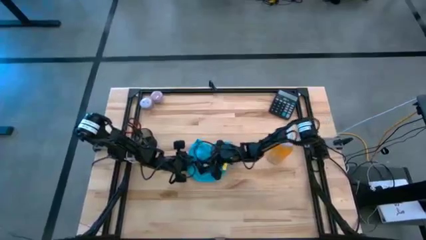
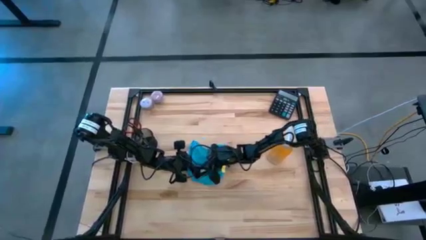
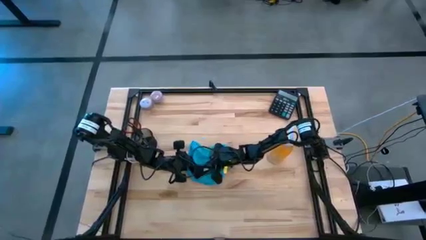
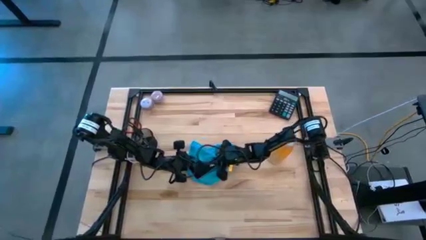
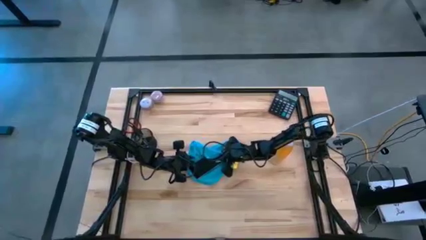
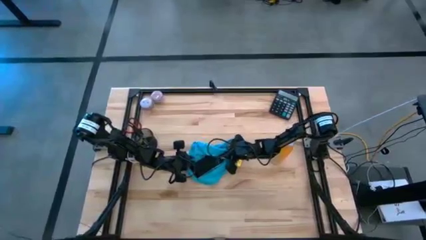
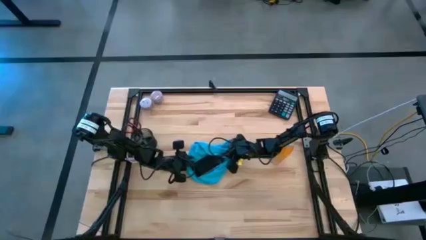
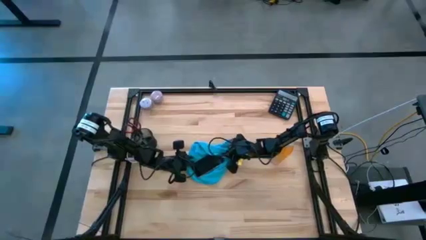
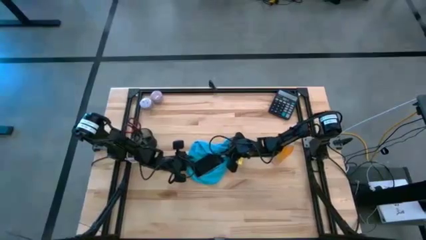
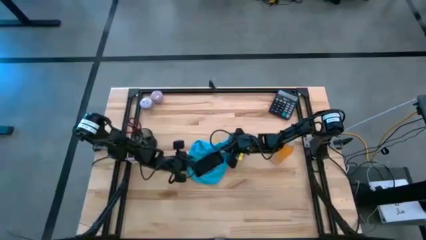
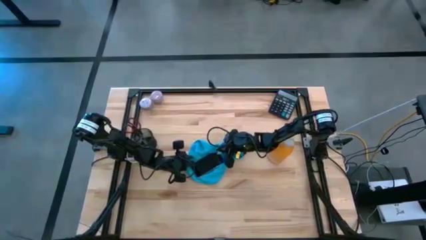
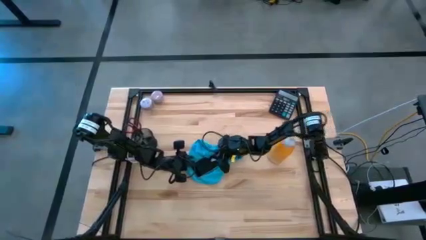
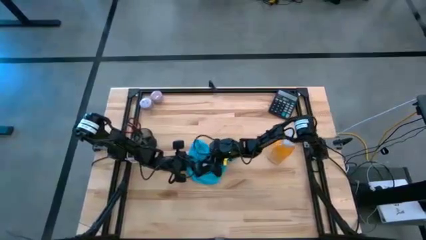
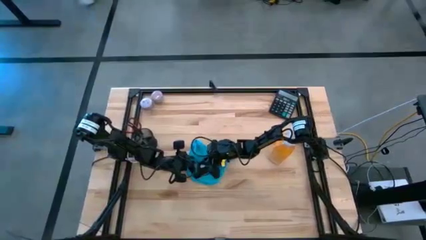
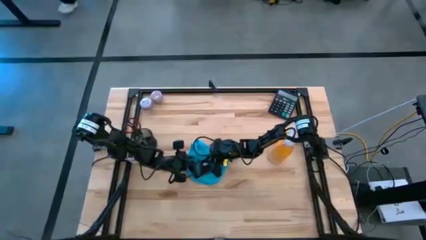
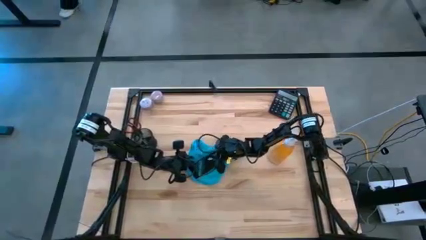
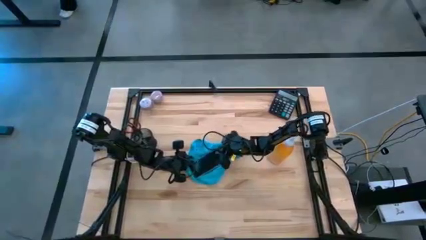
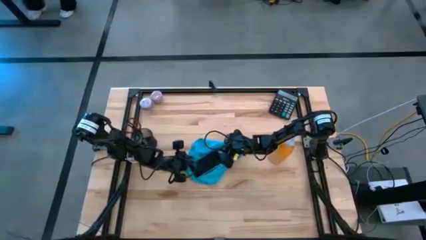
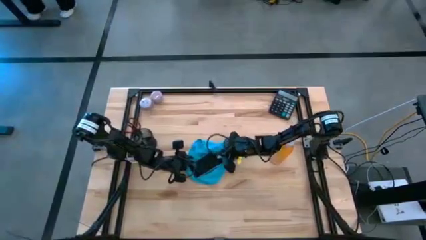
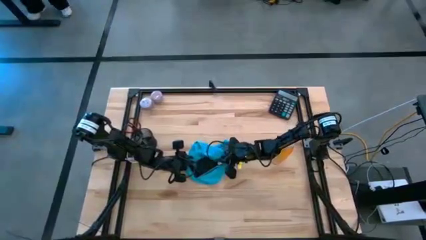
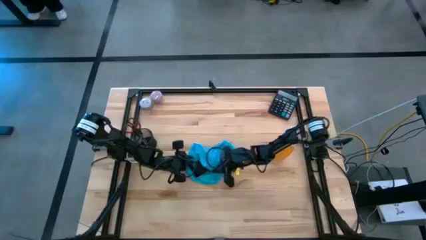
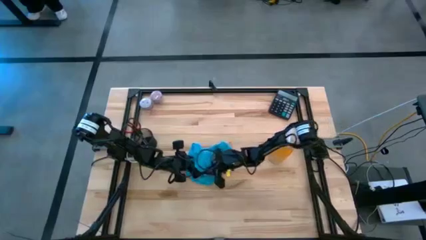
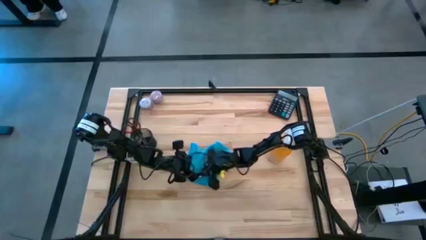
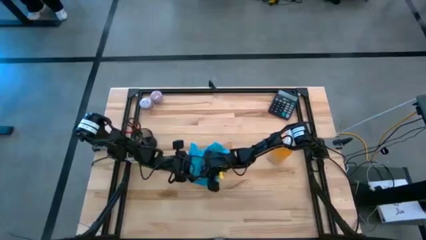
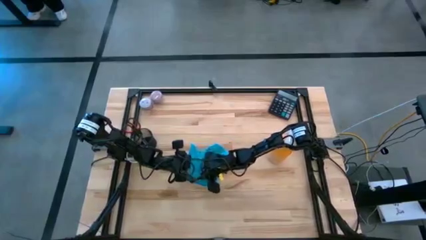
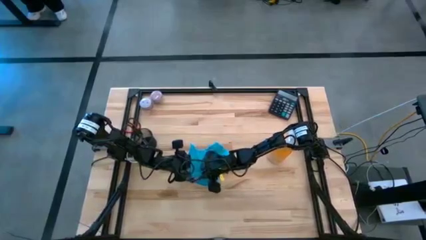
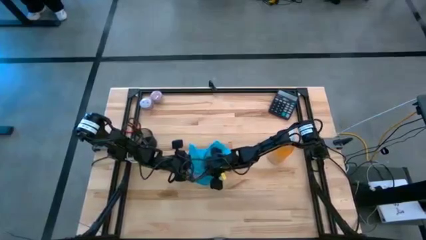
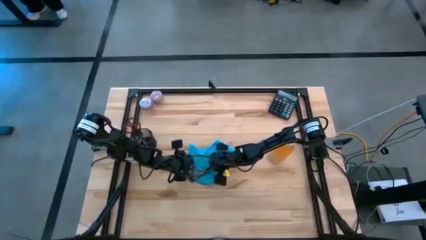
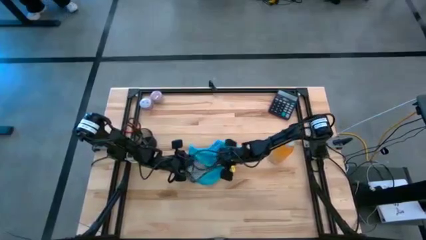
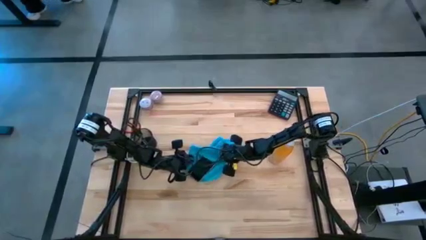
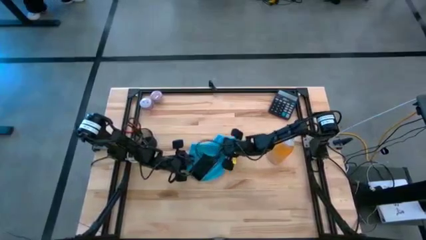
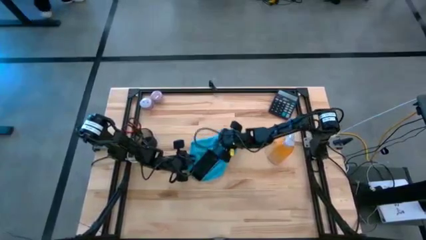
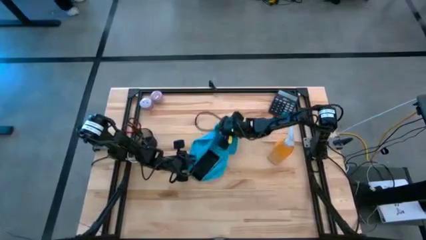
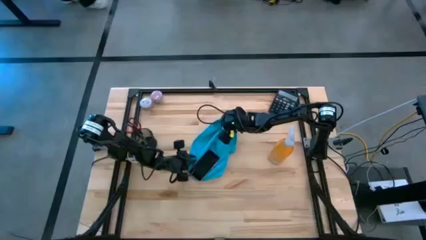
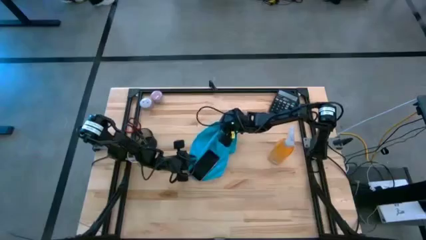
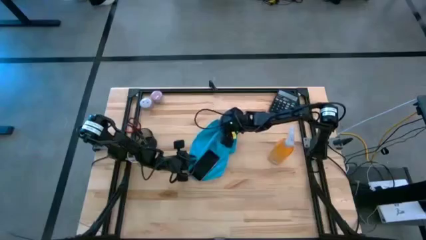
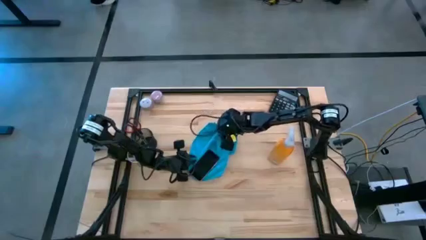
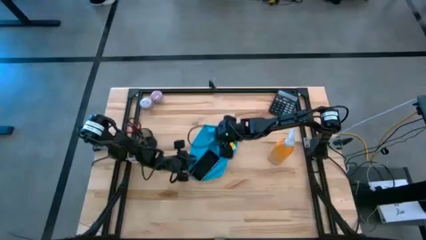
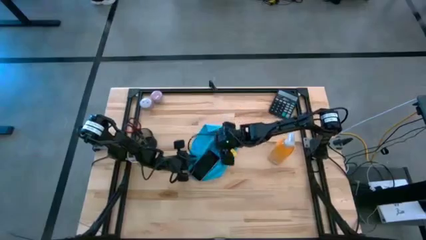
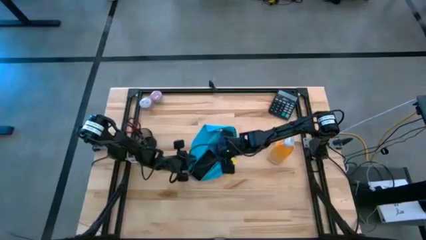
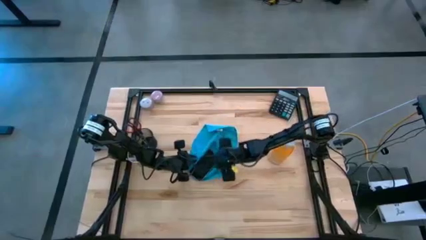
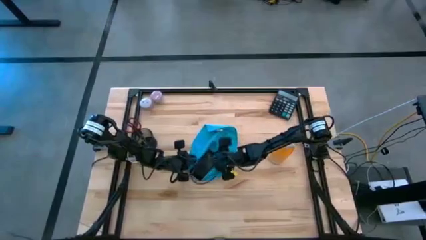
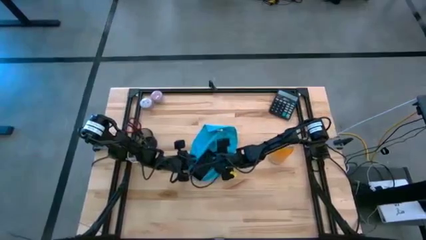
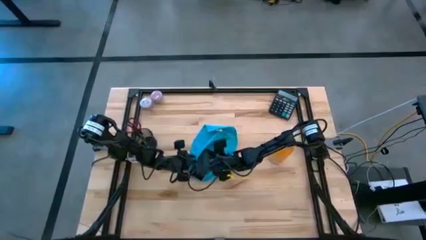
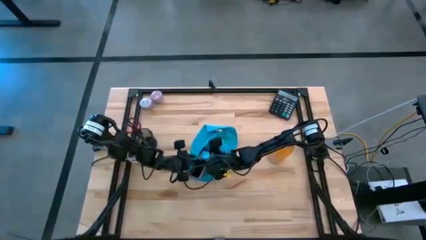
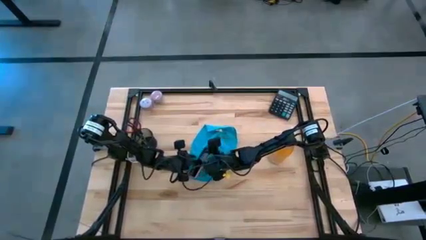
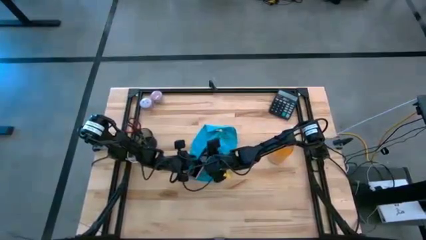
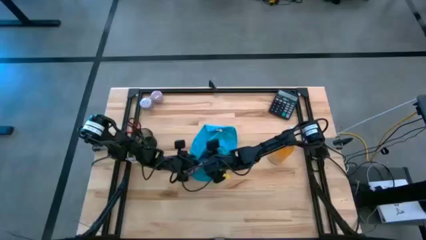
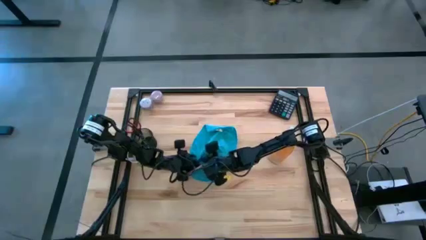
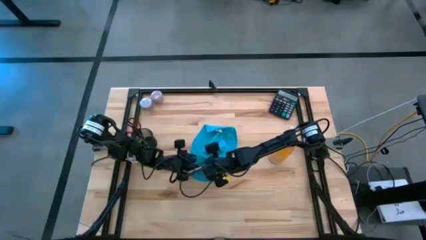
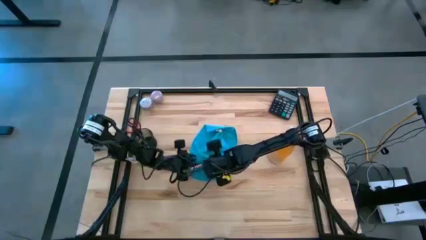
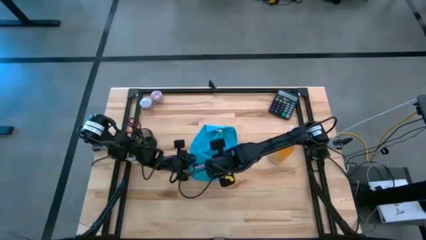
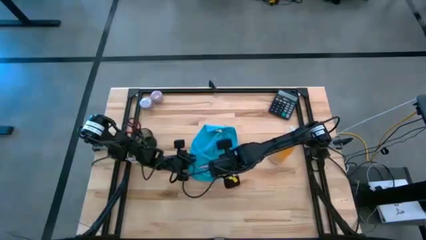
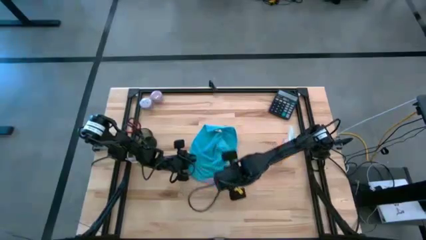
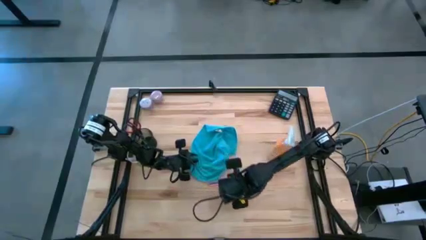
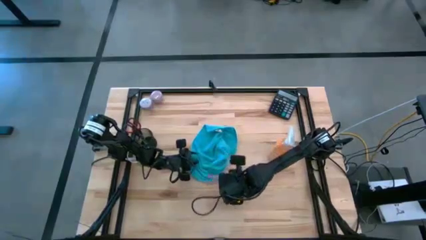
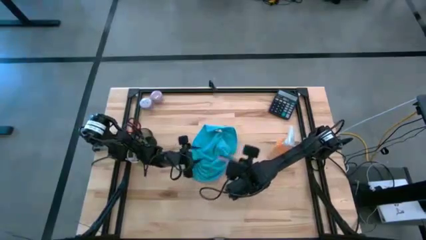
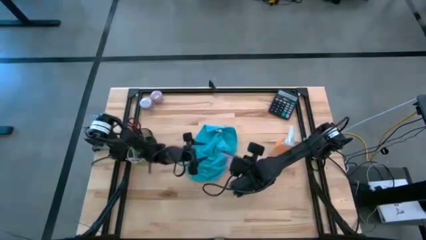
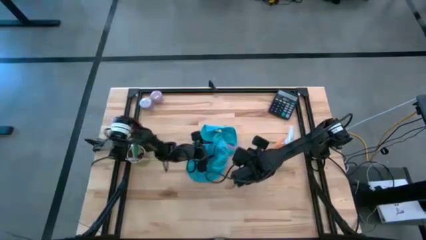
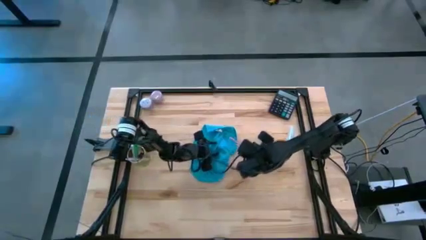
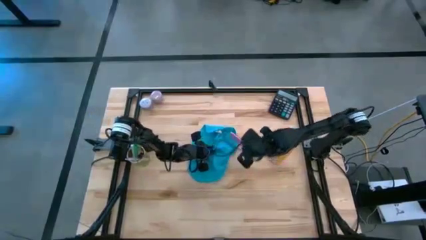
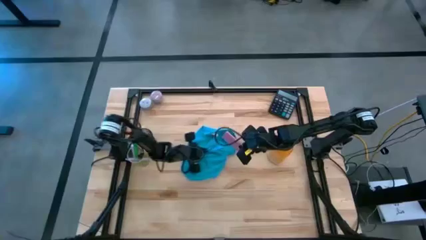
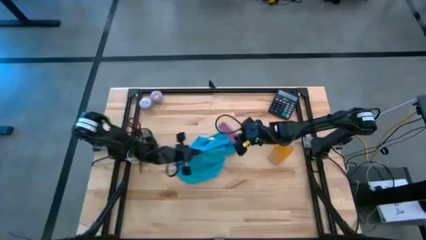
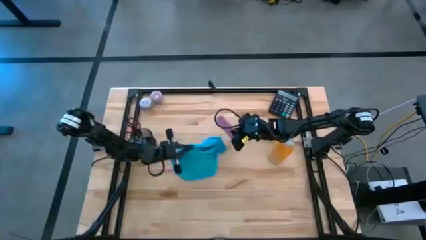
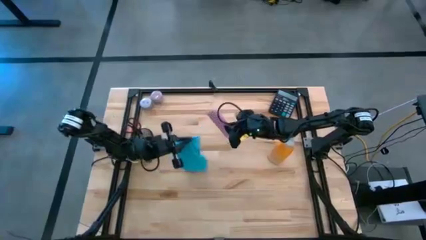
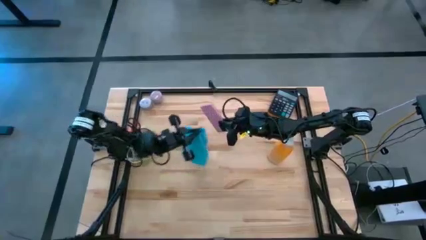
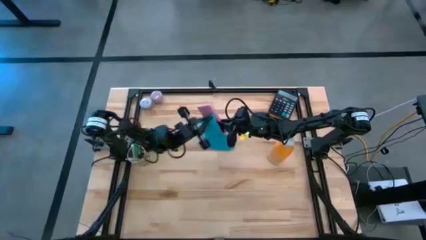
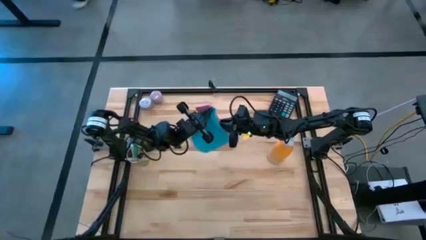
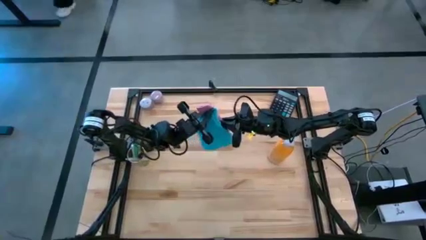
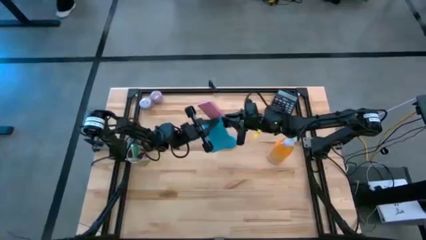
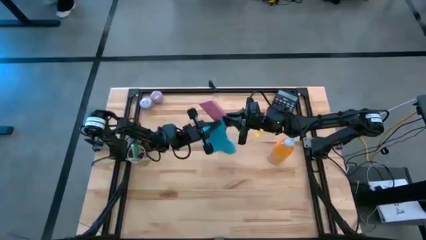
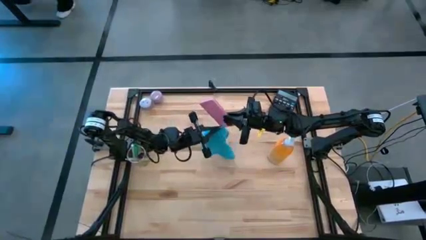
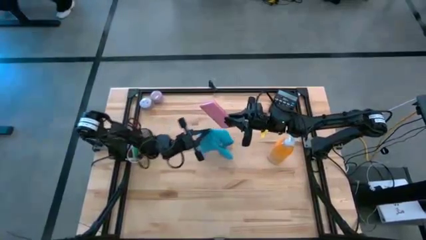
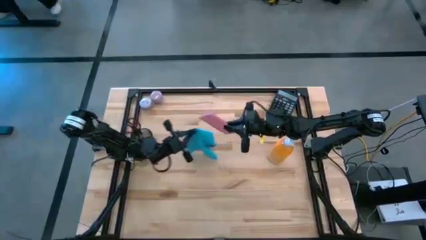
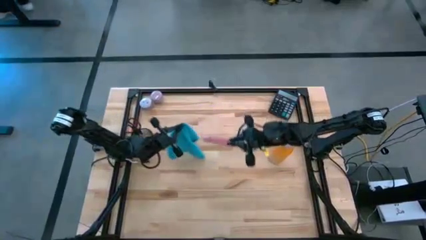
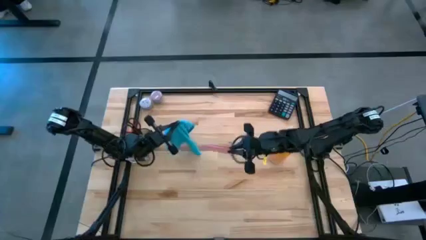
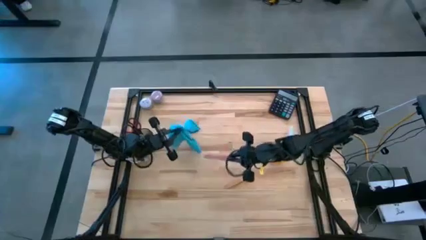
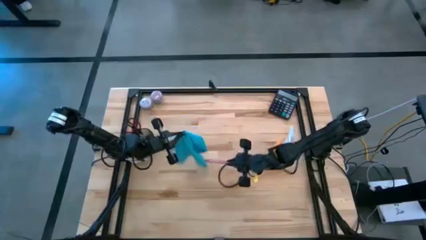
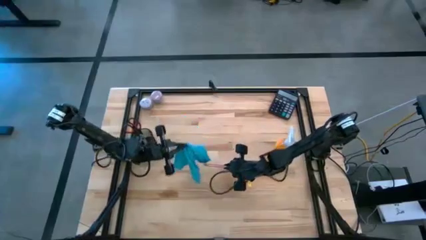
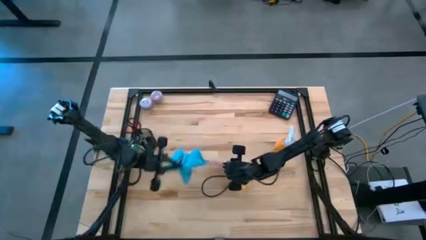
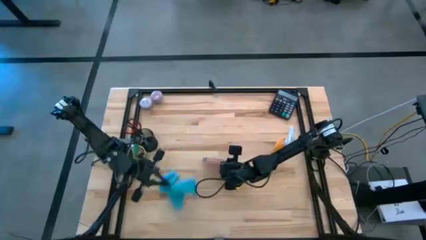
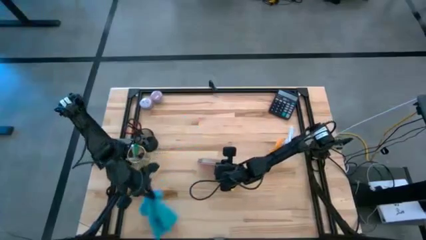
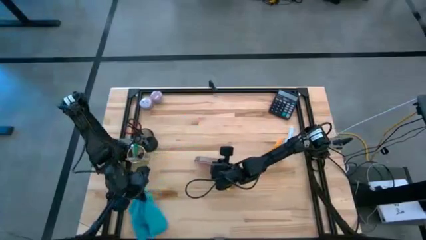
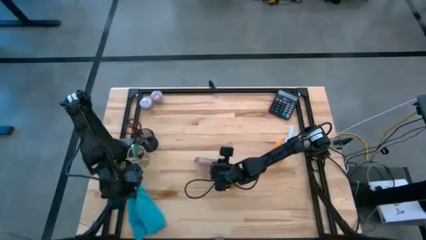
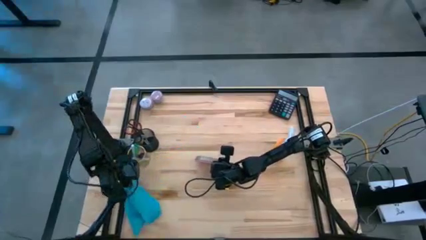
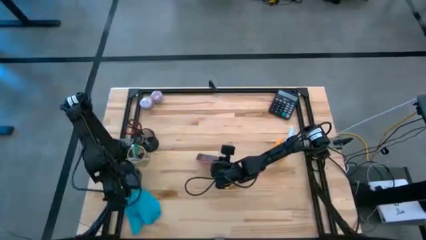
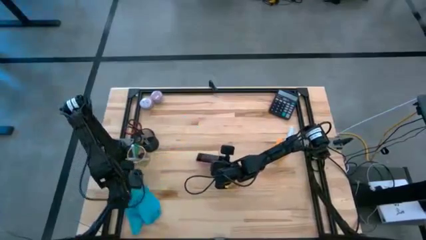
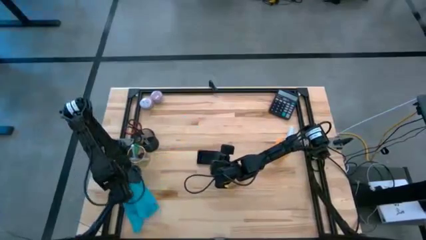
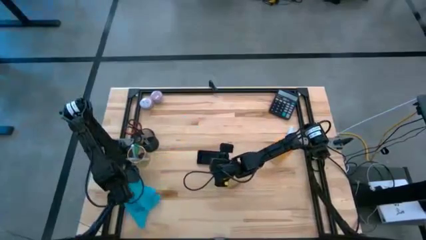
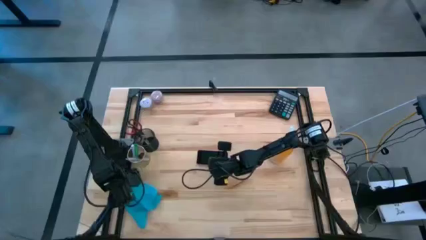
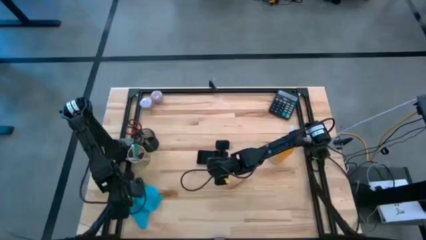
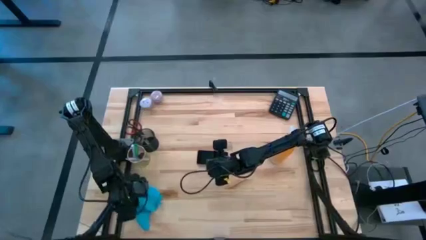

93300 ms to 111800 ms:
Task: Apply microfiber cloth
Wipe the pink cellphone with the blue microfiber cloth
